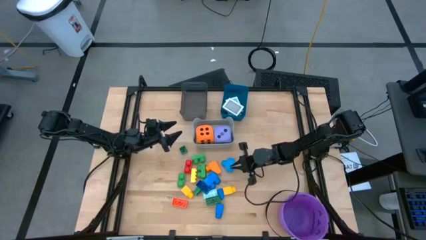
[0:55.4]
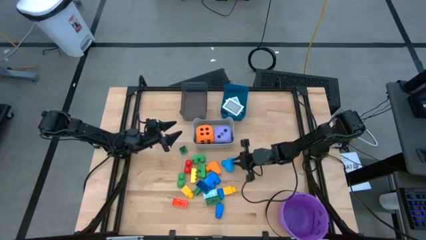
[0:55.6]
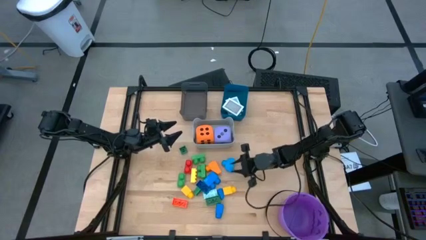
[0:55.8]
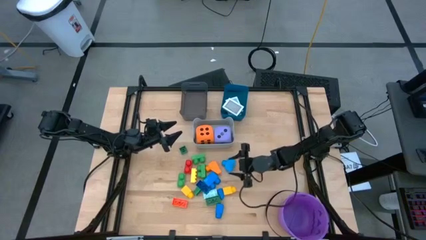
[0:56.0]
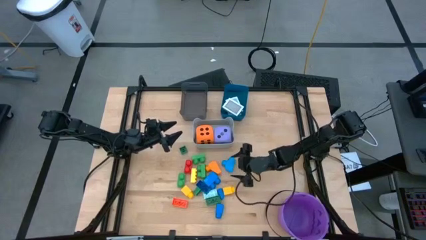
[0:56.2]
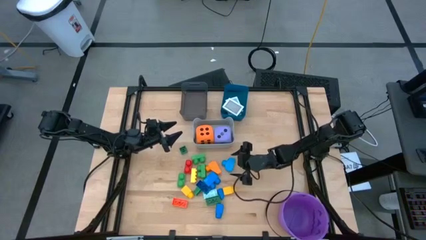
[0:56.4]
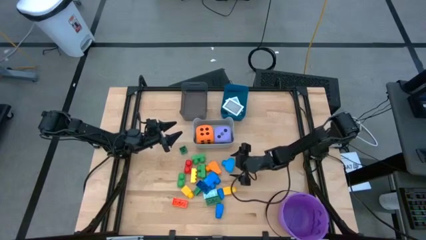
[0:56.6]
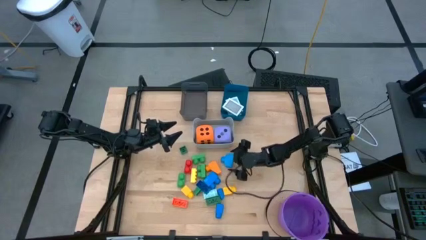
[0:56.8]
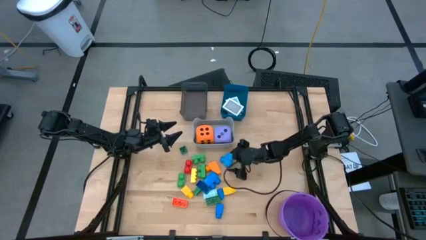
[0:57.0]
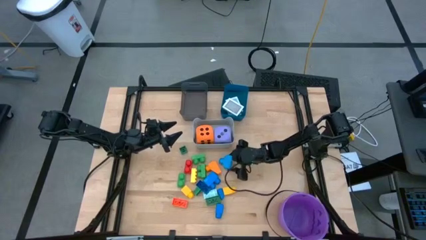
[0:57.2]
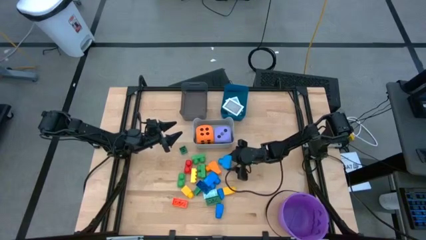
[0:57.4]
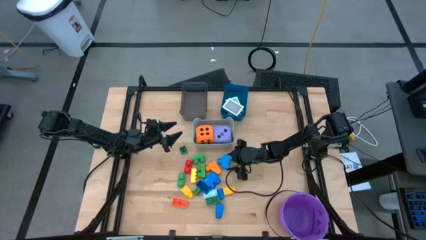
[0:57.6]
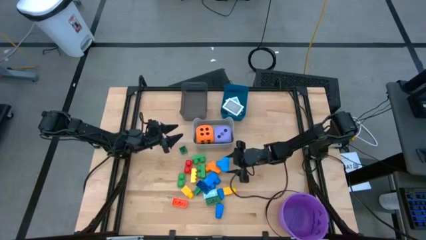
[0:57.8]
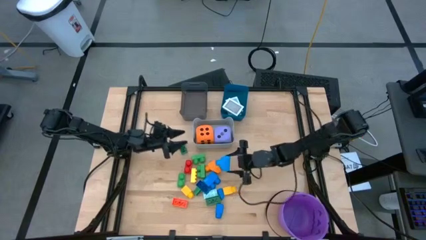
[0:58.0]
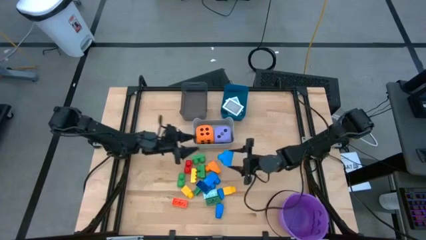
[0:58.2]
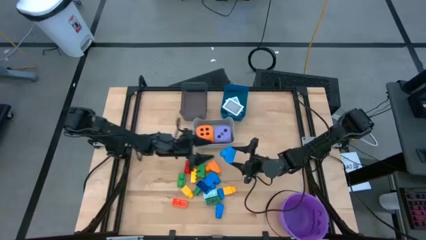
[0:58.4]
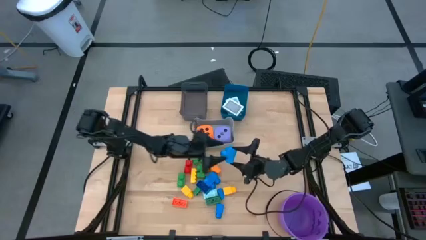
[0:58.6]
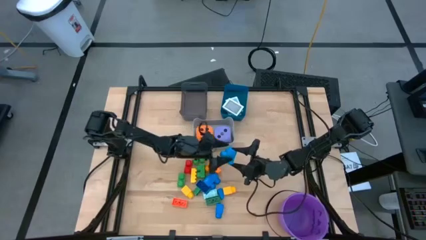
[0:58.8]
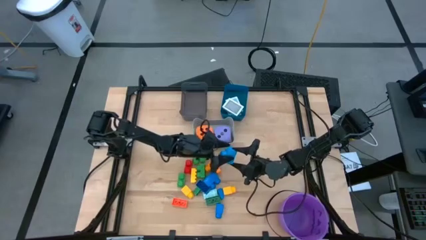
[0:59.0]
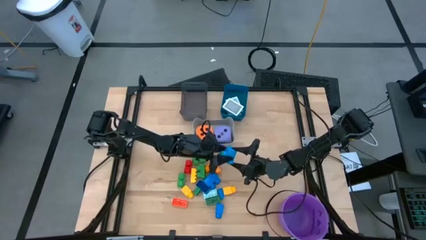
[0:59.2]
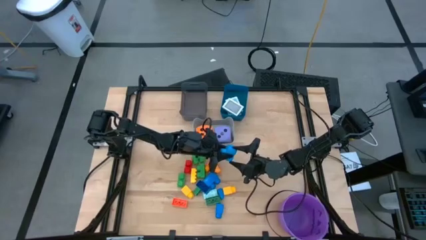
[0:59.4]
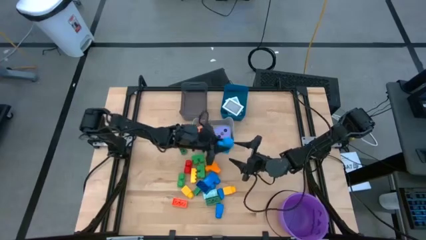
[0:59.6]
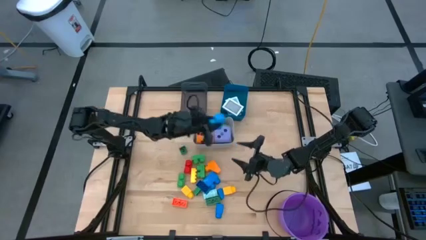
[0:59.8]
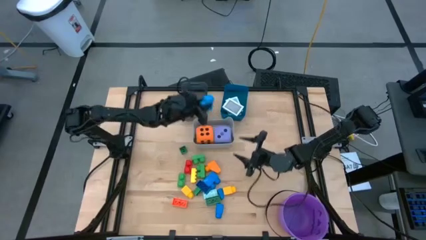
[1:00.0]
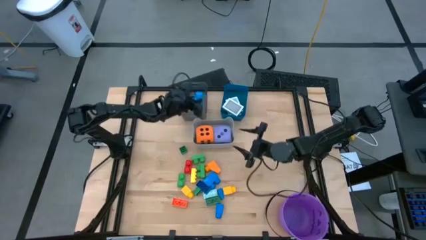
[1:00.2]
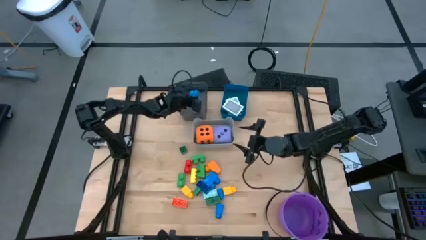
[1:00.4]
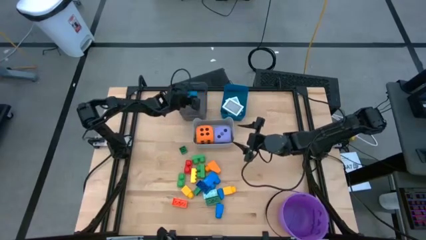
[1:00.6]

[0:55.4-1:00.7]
Task: Pick & Place Toys
Put the blue game piece into the black bin

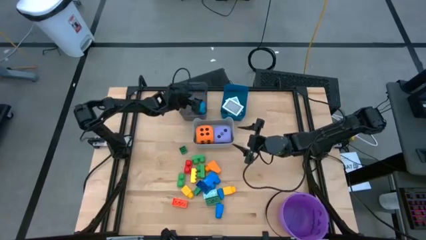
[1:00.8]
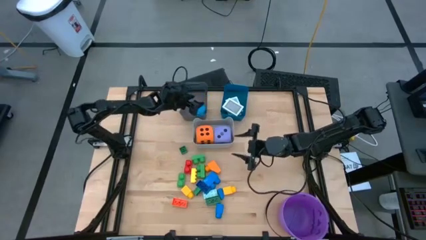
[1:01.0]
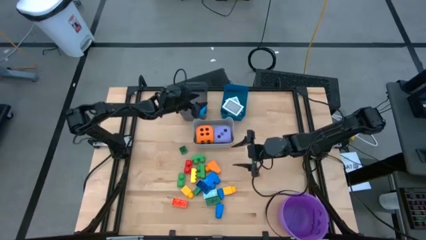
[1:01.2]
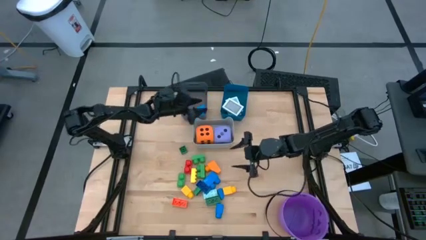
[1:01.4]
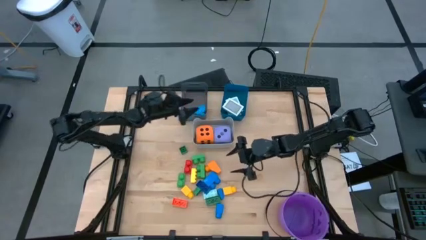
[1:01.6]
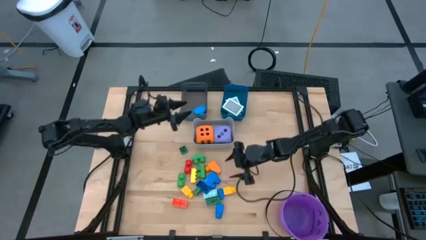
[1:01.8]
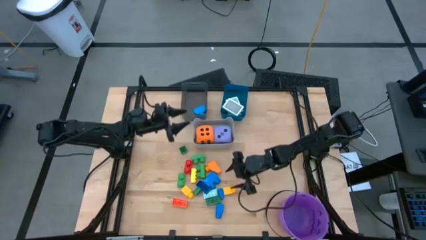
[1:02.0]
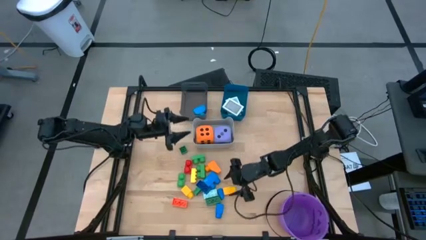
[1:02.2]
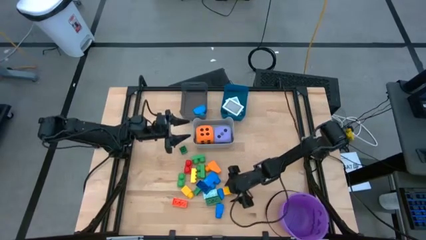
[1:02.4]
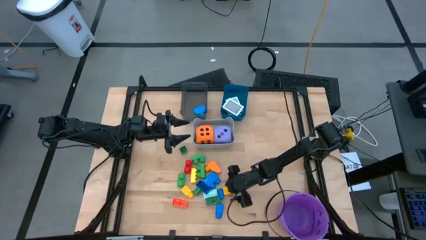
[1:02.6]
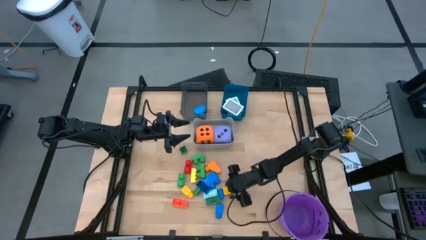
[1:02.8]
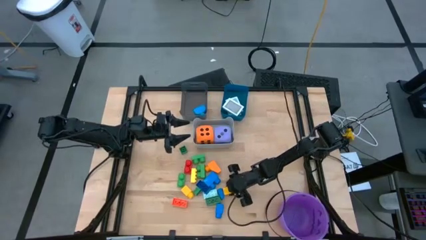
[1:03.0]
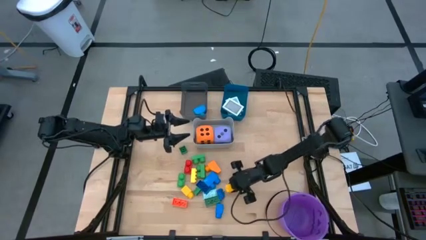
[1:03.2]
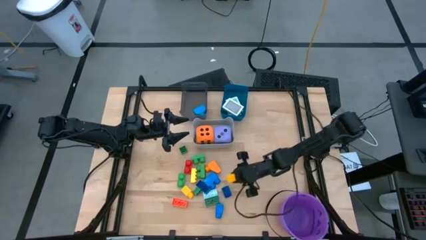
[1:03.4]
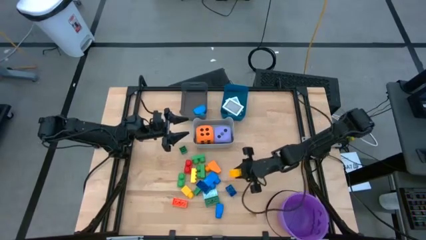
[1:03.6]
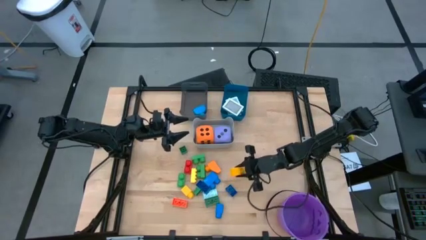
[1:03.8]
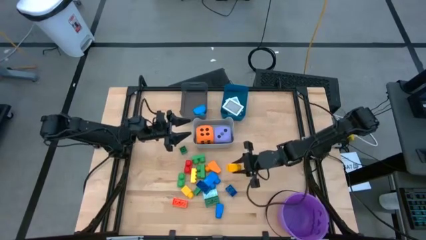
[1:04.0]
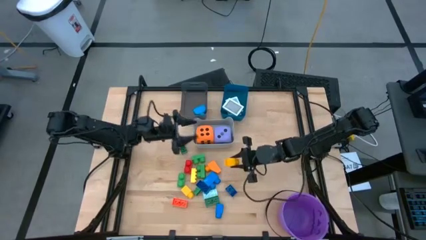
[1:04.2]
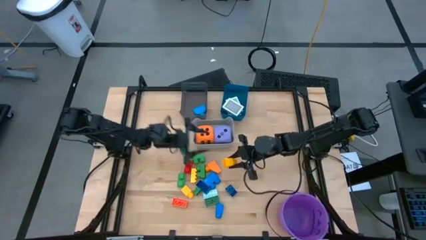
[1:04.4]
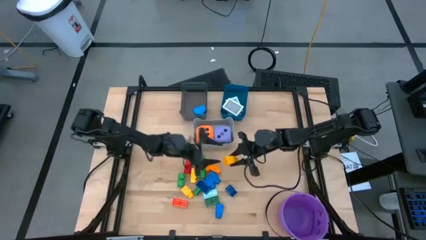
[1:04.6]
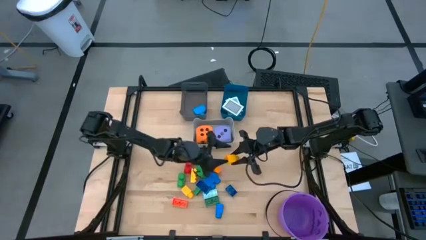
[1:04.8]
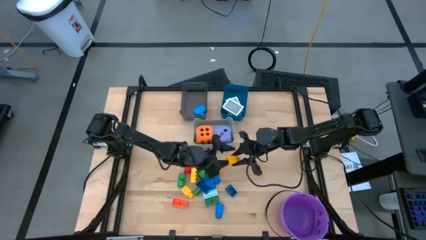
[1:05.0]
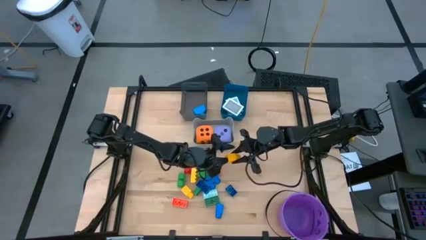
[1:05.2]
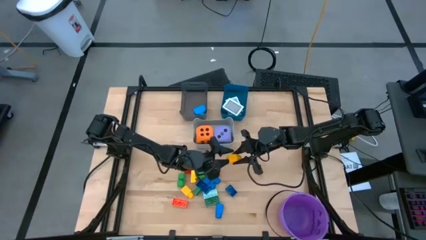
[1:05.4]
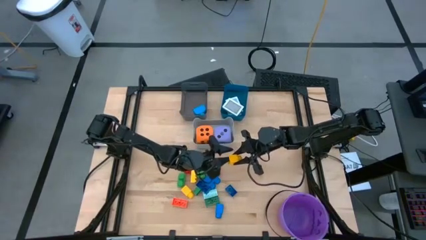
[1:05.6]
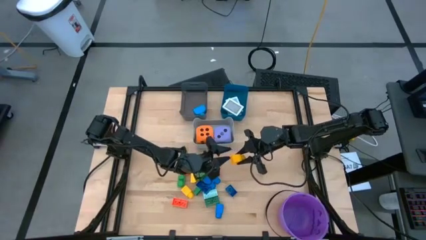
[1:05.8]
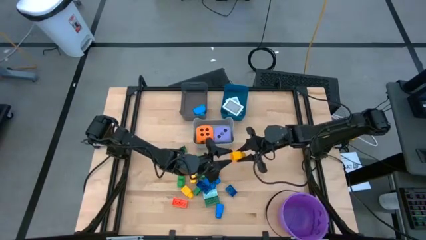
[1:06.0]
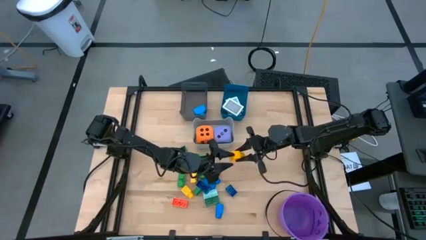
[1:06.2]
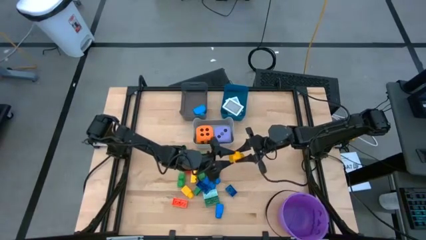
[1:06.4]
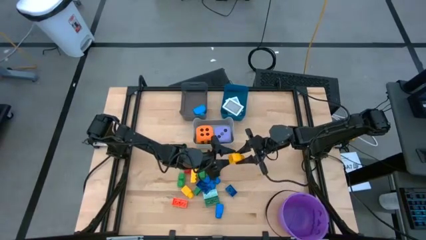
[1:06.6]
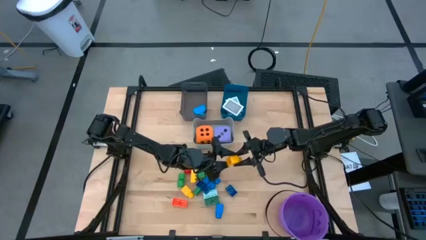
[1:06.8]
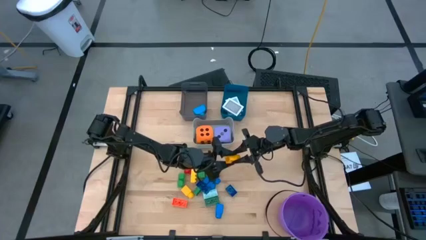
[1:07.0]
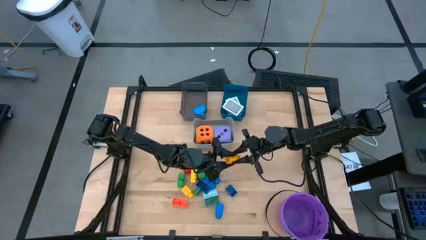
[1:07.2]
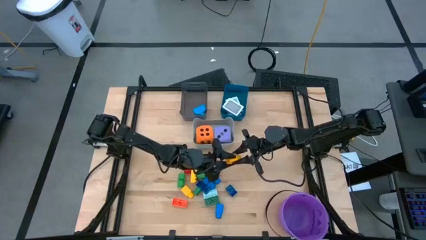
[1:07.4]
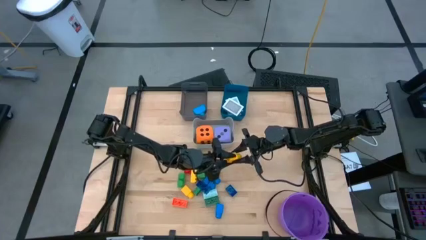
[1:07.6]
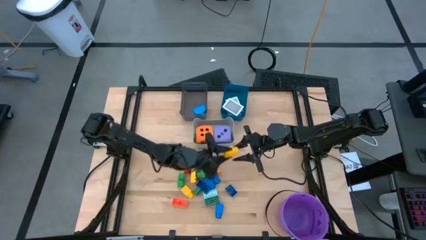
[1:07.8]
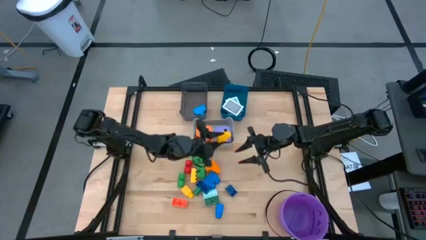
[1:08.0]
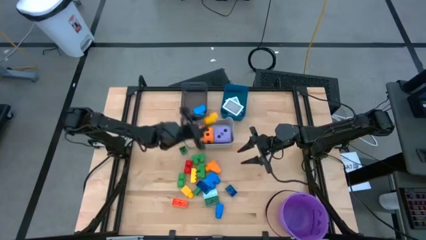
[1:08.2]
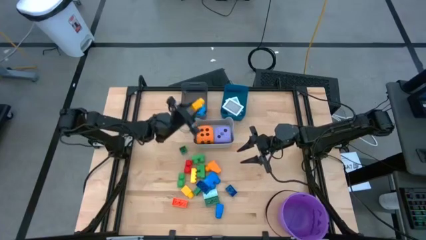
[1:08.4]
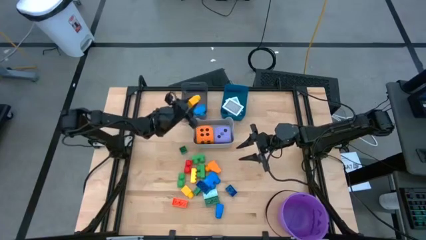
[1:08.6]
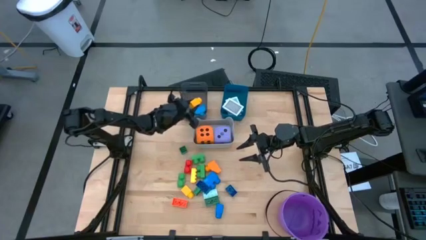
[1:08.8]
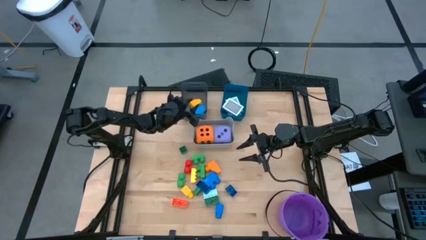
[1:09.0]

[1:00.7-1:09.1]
Put the right yellow game piece into the black bin
